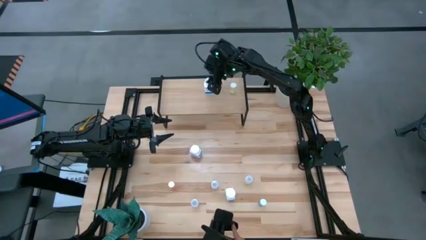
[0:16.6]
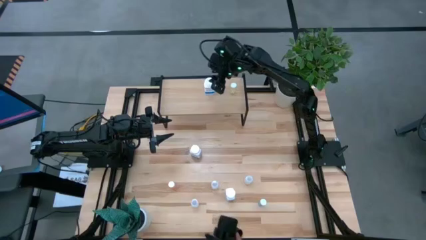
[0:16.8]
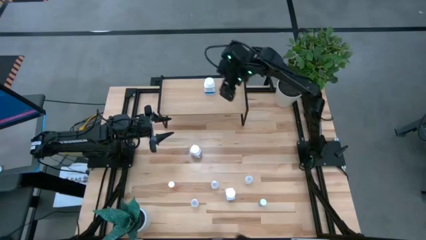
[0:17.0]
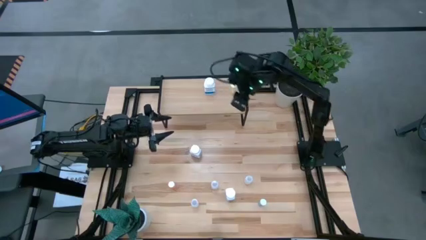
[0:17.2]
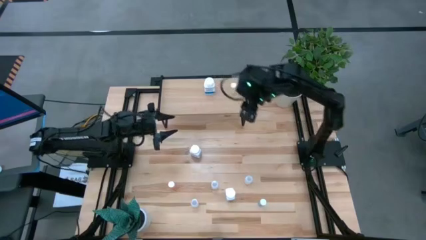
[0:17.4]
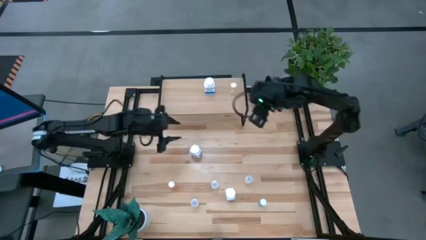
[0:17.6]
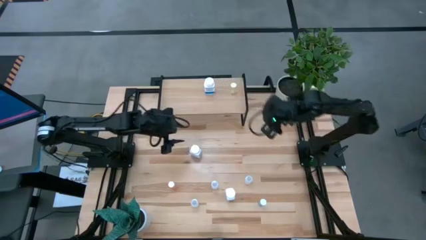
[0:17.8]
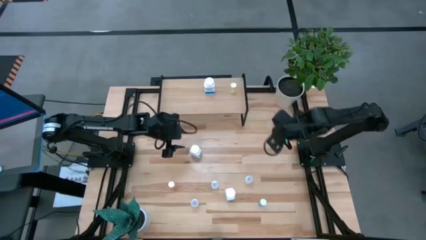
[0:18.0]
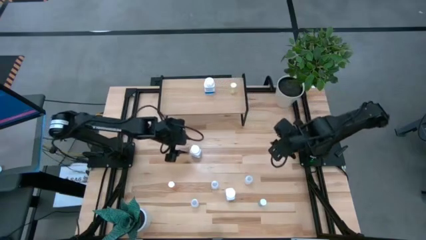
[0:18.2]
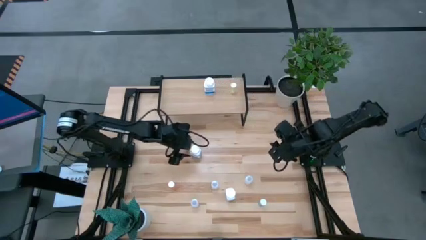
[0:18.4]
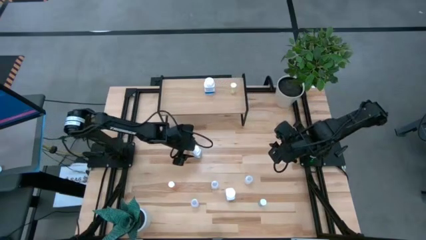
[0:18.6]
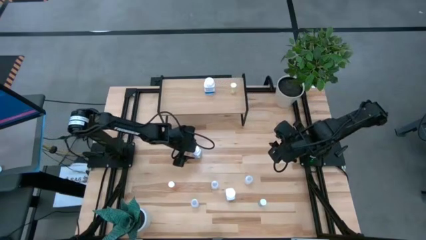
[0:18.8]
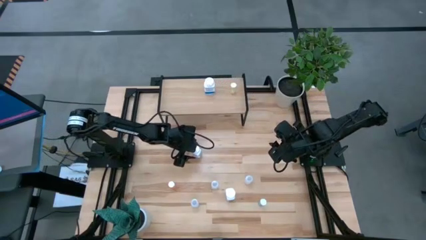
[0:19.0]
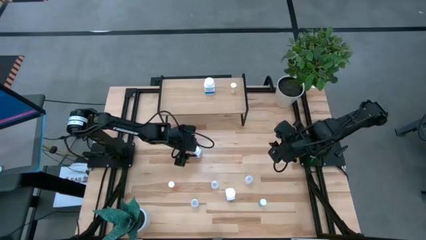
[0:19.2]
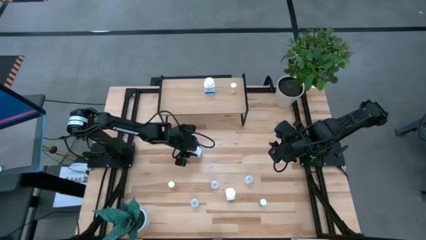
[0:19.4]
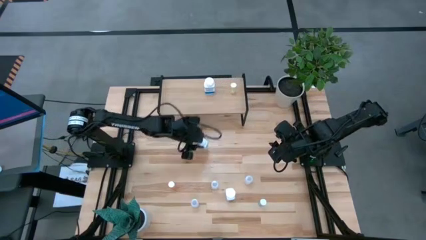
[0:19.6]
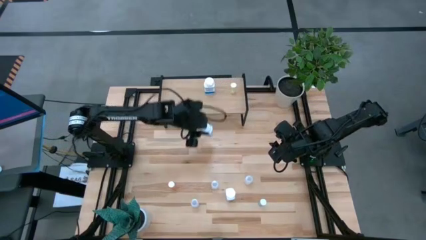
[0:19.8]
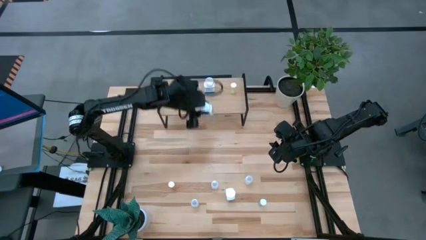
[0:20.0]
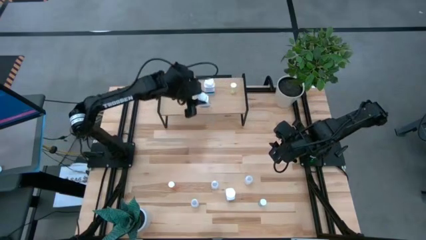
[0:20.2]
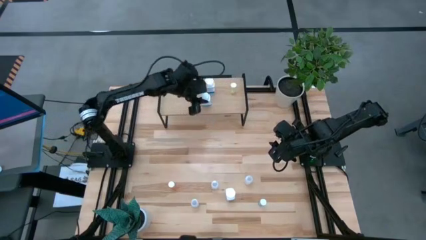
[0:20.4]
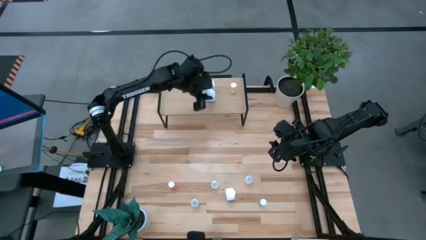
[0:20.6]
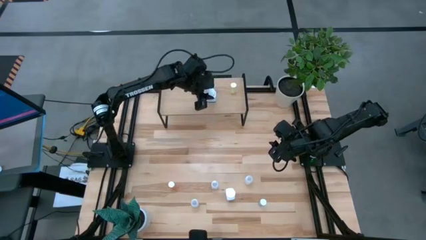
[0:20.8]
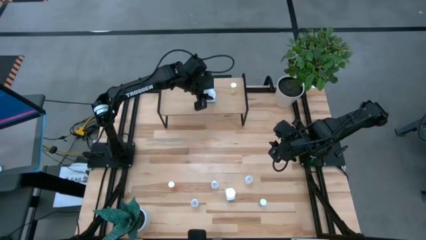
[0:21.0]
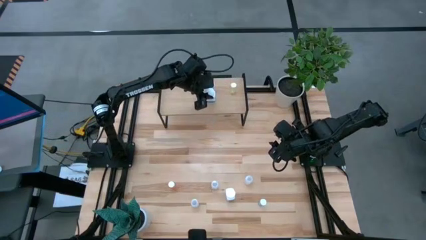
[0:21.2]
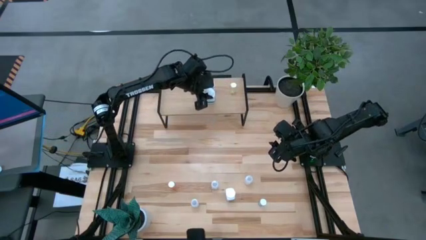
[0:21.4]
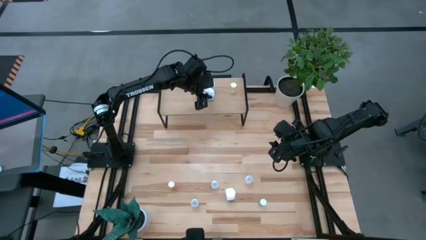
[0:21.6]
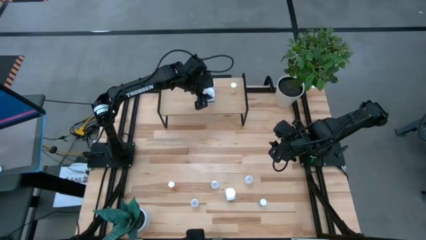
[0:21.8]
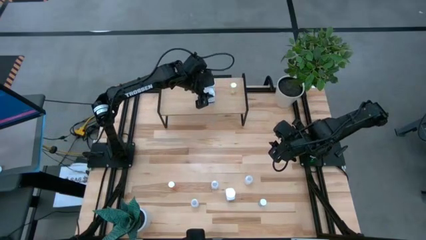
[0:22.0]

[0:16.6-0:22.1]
Task: Pick and place medicine bottles onto shelf by color
Put the top white blue pill bottle on the shelf and align it with the other white blue pill bottle

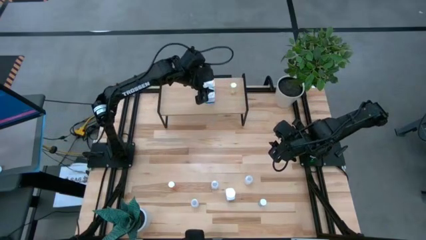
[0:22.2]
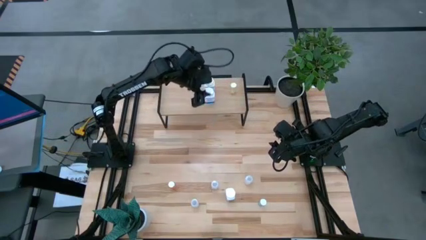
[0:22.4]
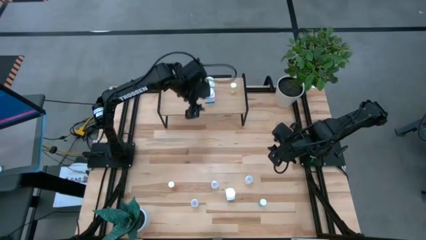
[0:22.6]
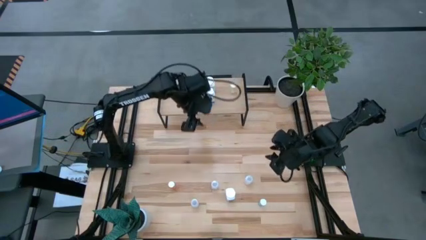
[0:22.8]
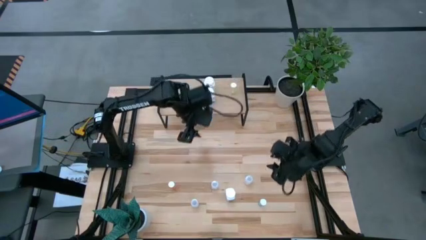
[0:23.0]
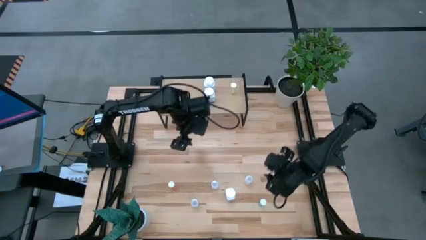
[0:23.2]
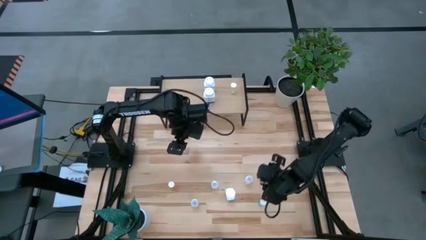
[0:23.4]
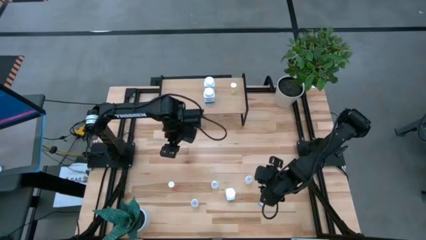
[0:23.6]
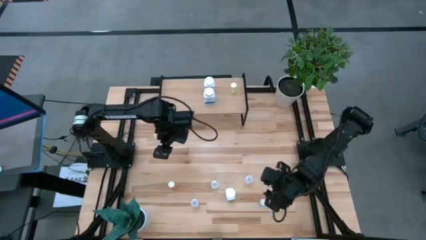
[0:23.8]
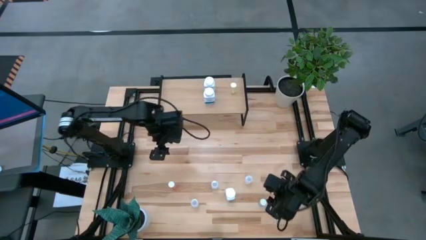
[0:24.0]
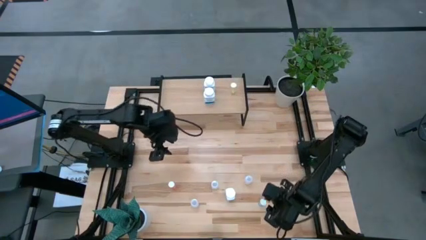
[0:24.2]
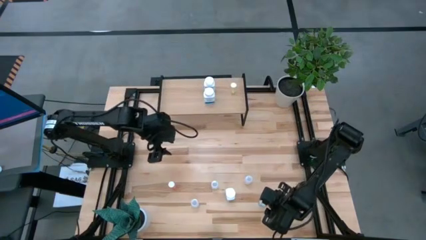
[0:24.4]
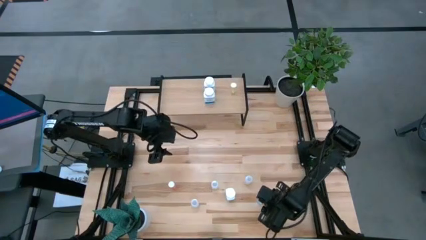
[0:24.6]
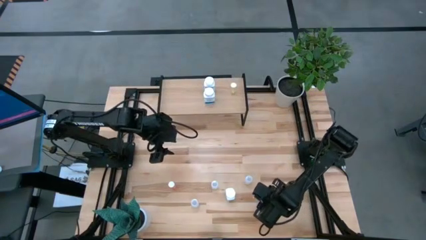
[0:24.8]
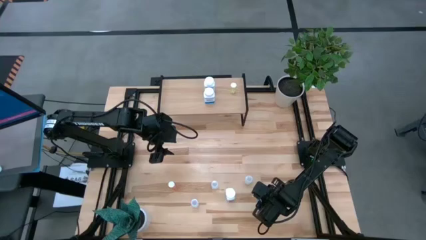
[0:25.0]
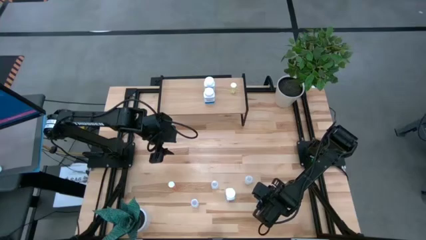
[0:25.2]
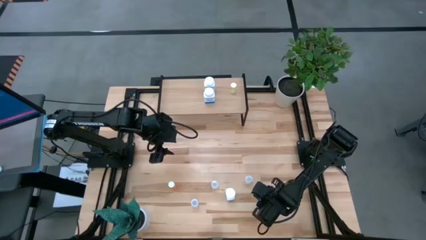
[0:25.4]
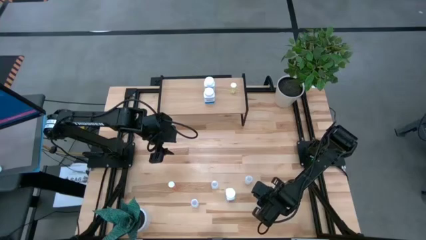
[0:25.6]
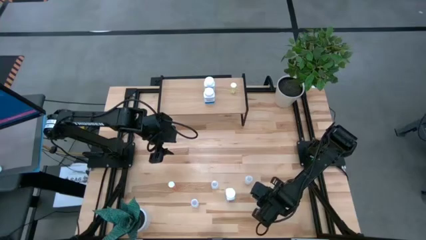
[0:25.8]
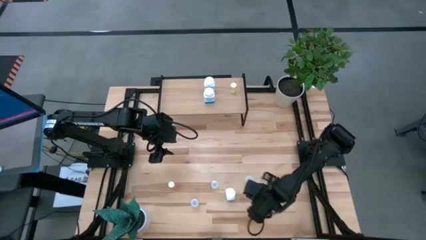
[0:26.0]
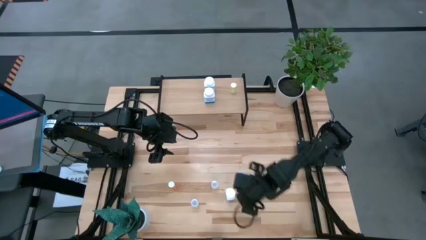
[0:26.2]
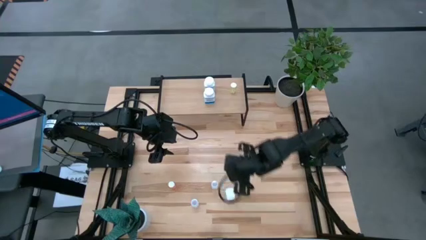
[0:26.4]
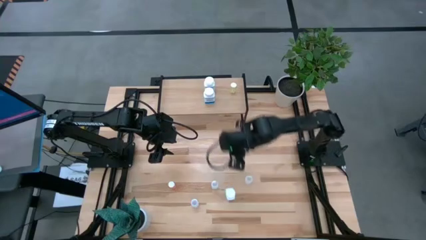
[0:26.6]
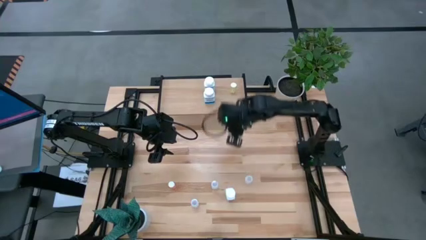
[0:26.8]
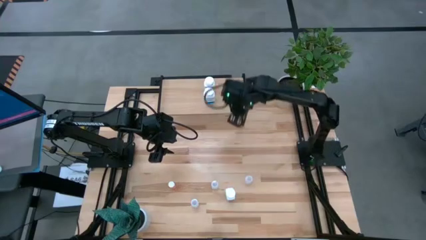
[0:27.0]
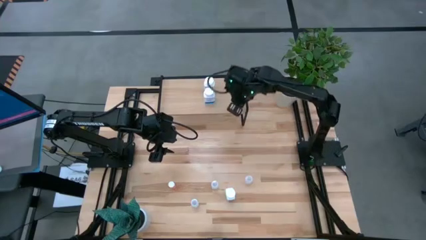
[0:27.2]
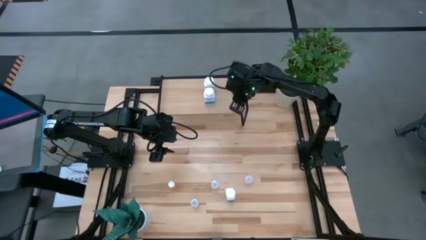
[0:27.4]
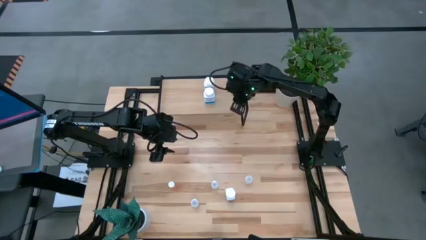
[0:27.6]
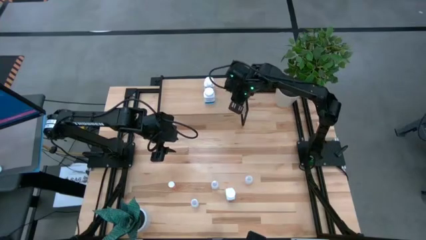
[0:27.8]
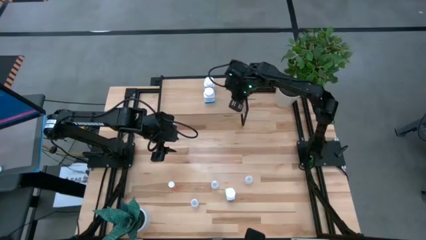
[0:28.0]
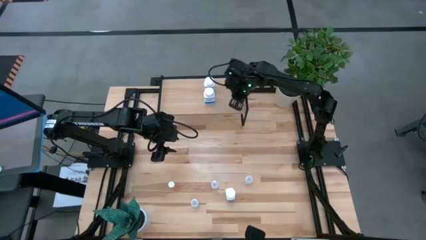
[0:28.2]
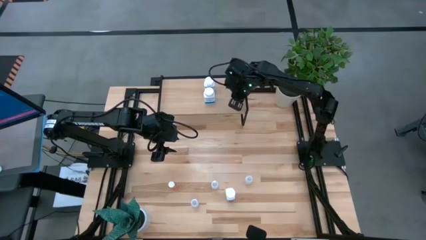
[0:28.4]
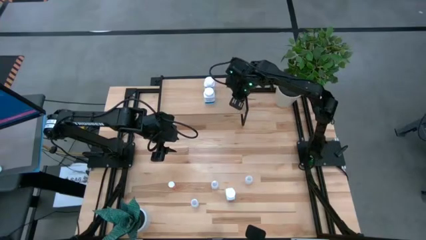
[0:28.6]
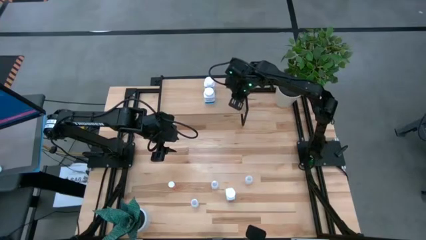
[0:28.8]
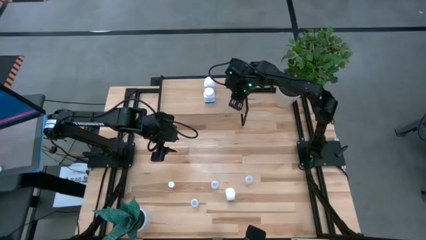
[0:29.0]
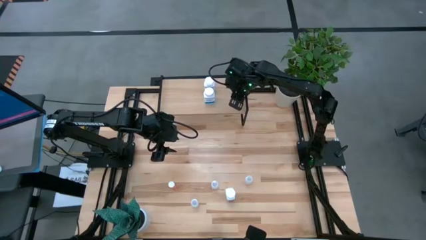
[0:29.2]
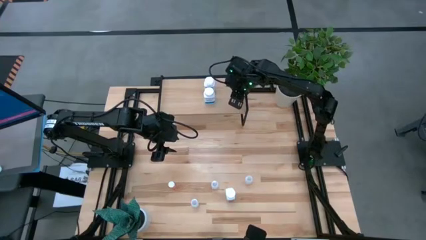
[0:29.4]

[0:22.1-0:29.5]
Put the blue pill bottle on the shelf

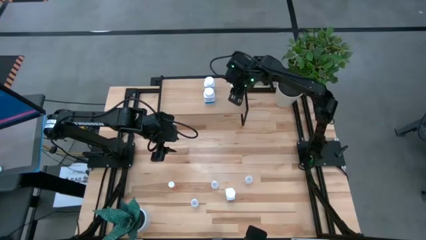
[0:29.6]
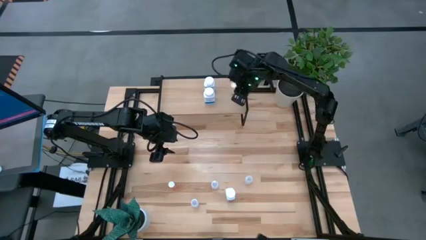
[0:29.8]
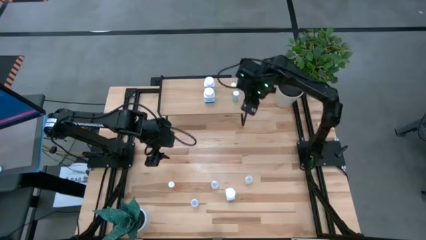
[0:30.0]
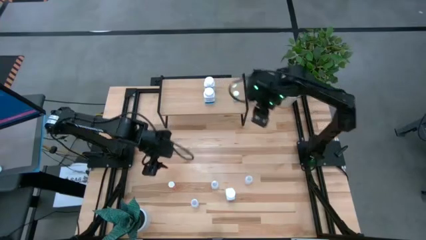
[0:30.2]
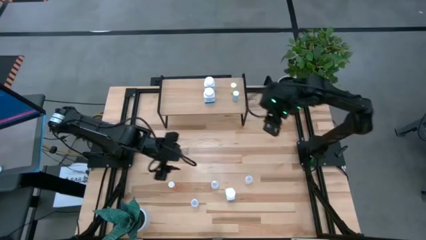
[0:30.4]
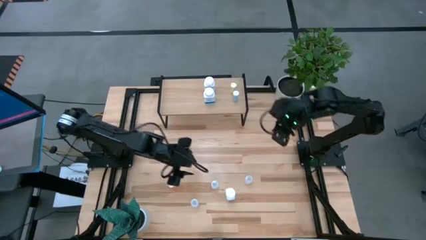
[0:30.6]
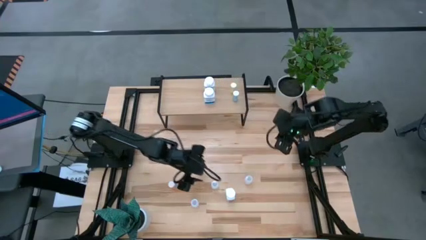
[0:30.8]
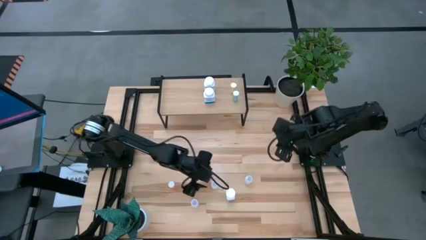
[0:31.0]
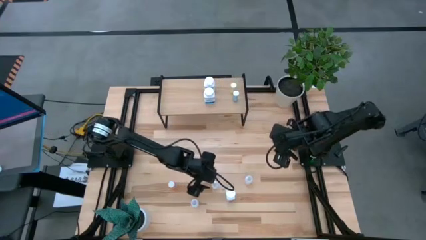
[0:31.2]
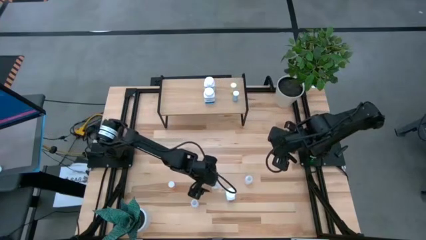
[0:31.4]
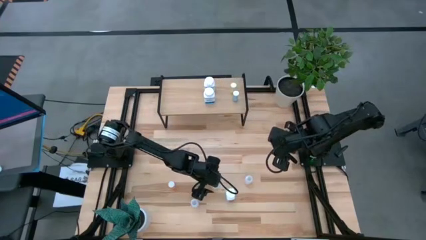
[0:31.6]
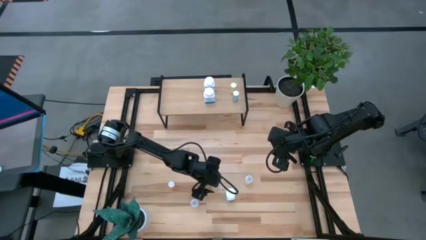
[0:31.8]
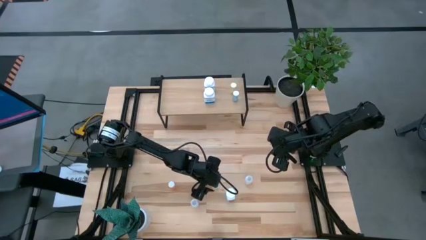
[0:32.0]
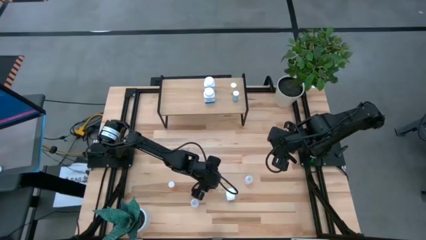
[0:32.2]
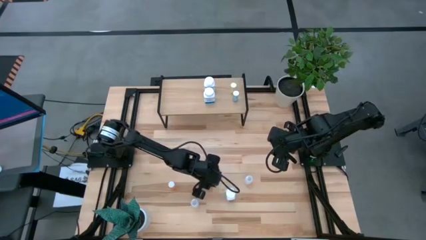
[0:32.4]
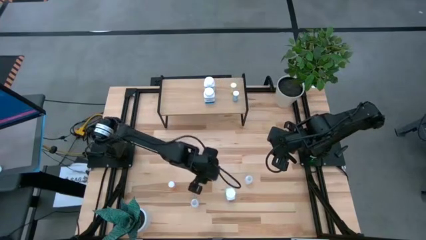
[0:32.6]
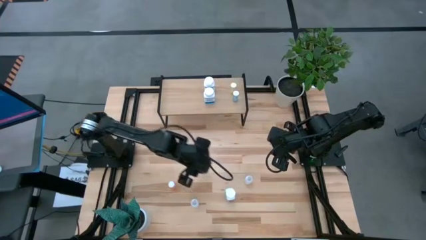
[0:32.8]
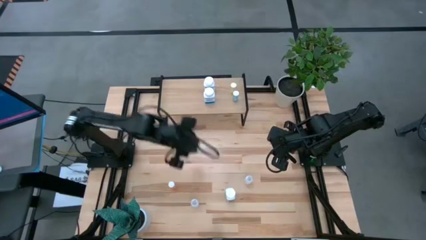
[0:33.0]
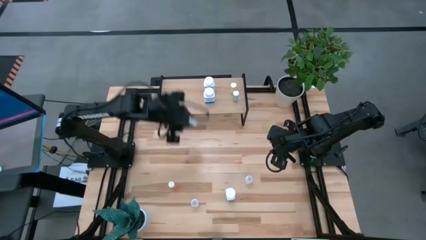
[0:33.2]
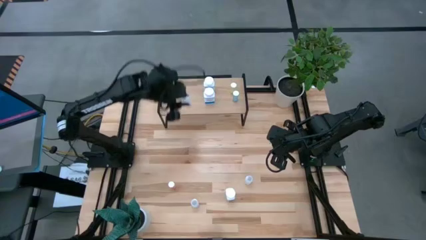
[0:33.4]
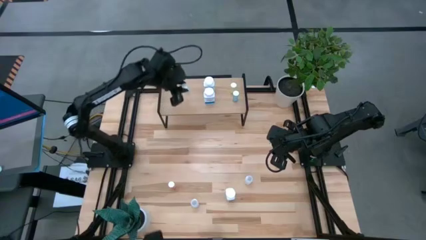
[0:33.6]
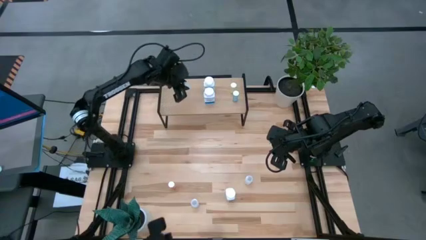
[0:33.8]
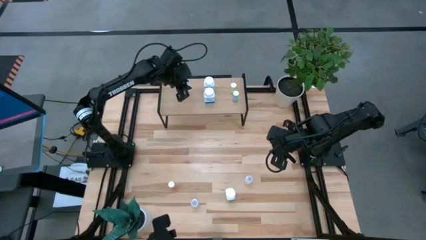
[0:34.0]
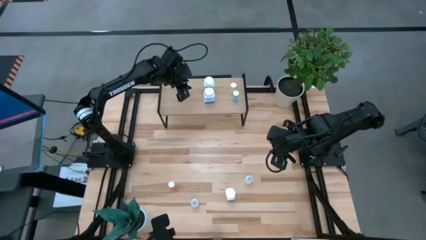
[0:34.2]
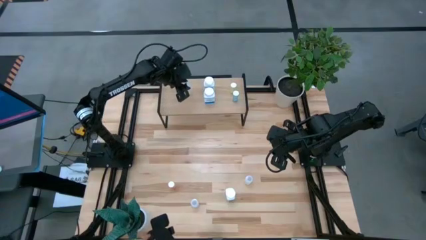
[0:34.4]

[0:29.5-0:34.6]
Put the top left white pill bottle on the shelf
